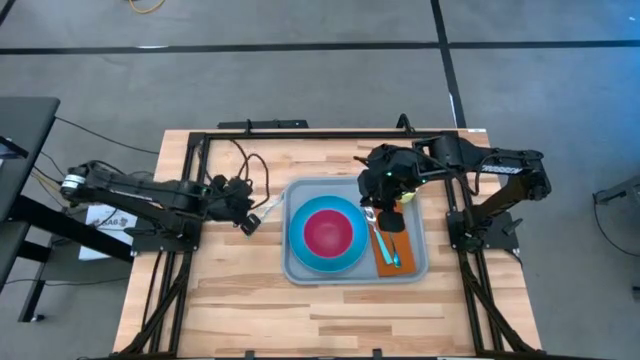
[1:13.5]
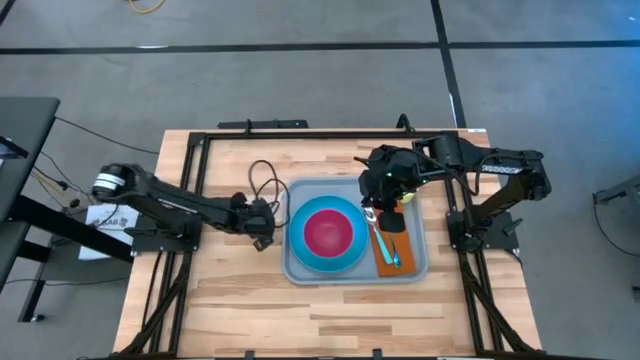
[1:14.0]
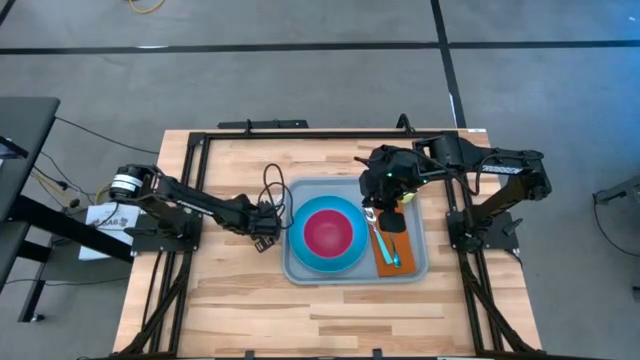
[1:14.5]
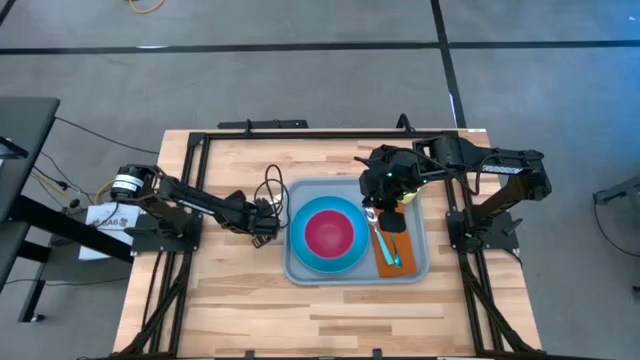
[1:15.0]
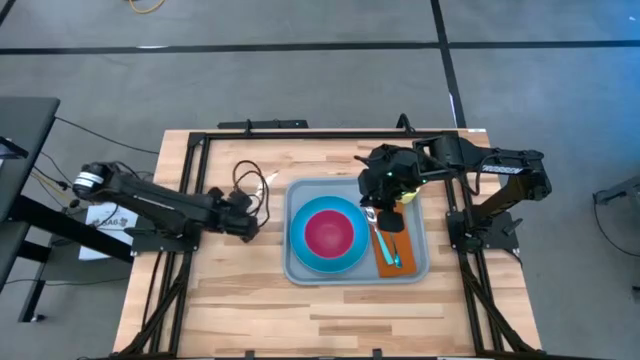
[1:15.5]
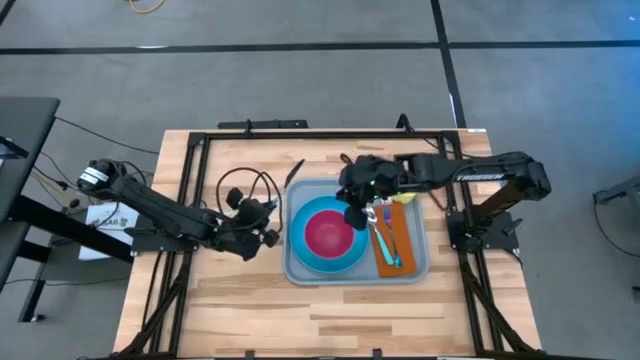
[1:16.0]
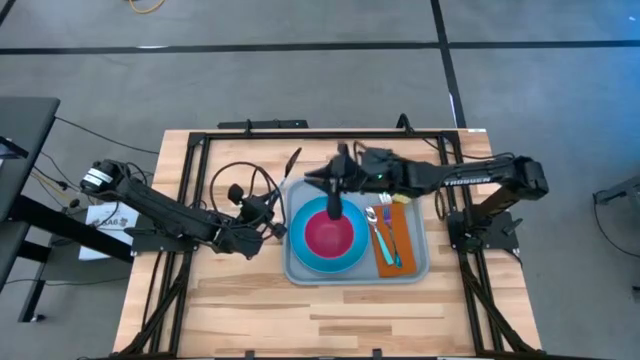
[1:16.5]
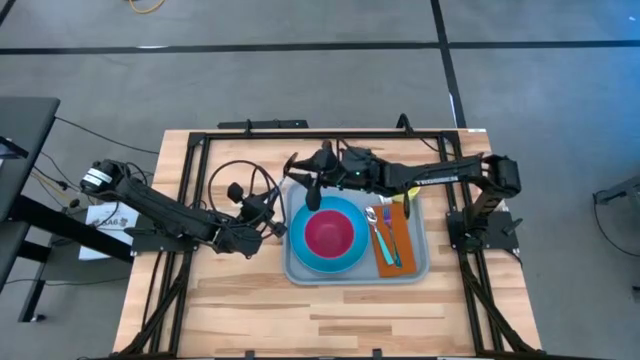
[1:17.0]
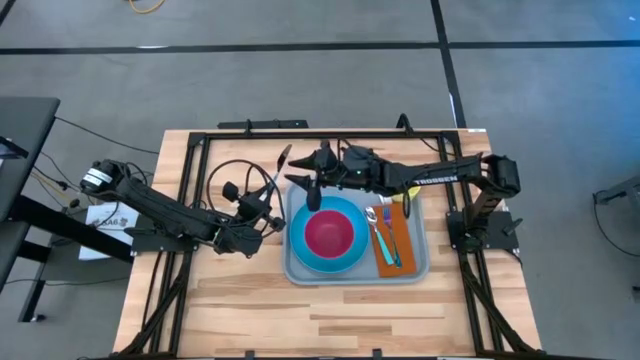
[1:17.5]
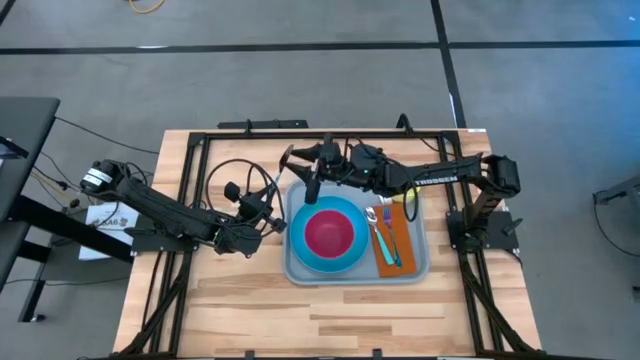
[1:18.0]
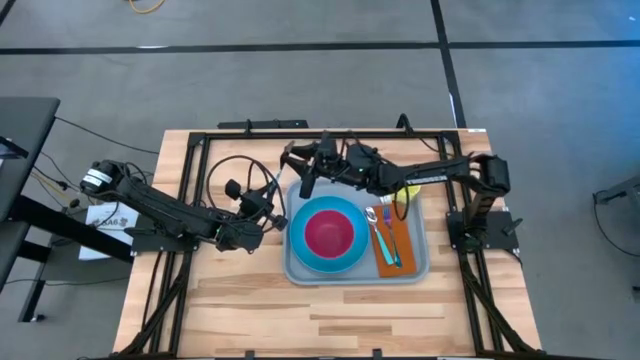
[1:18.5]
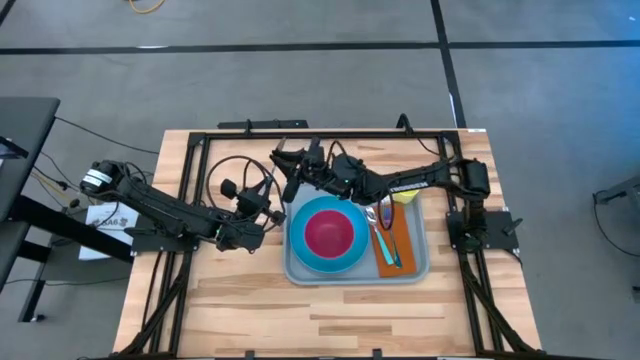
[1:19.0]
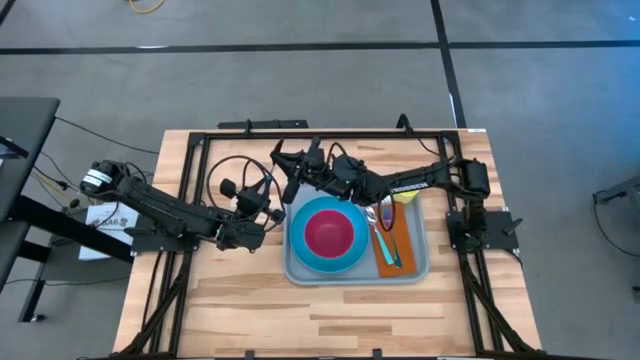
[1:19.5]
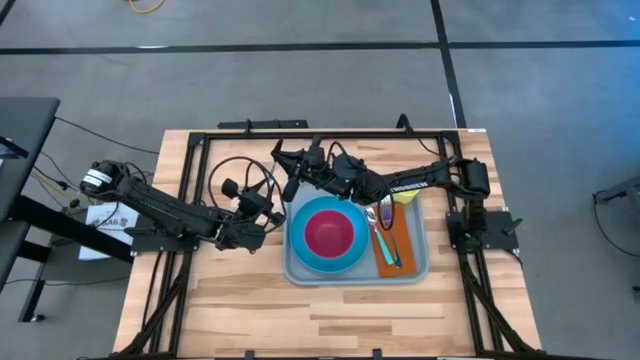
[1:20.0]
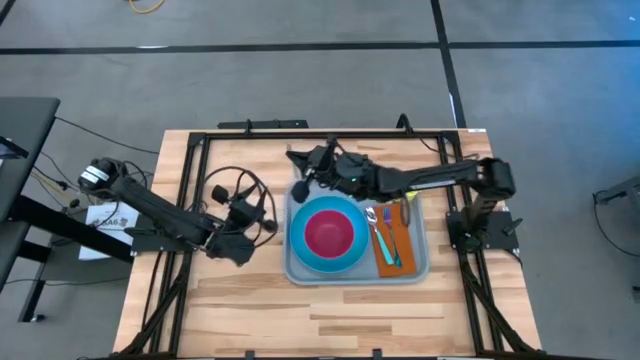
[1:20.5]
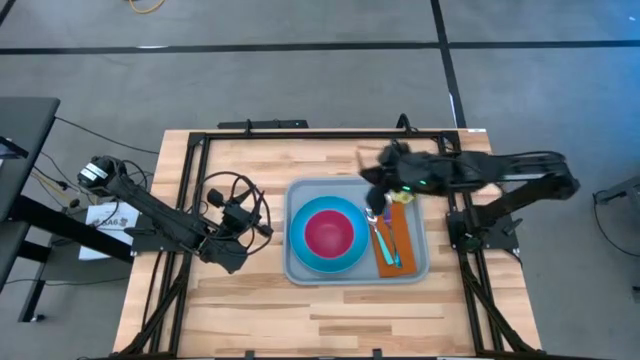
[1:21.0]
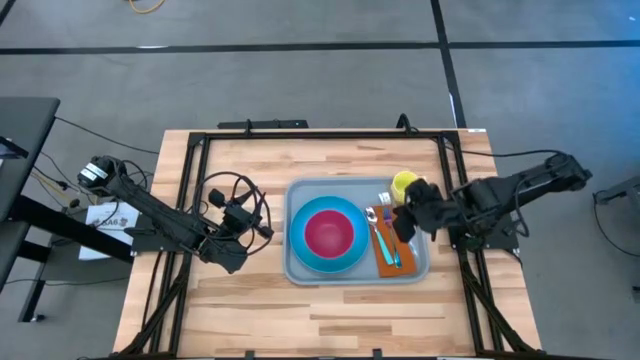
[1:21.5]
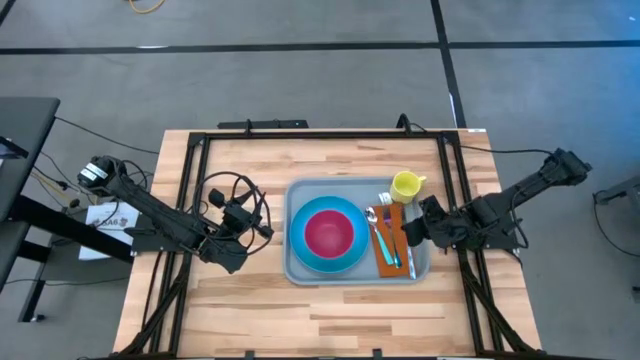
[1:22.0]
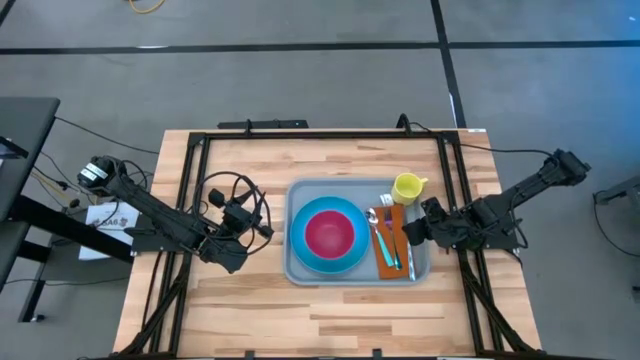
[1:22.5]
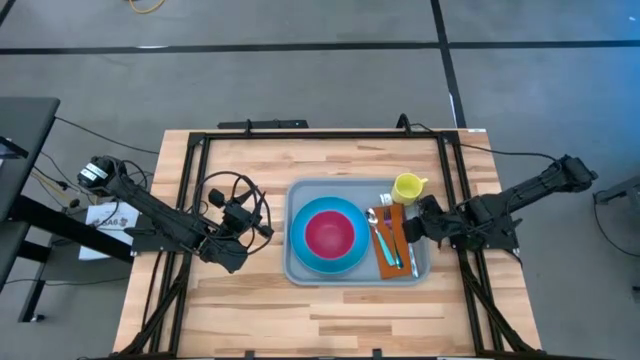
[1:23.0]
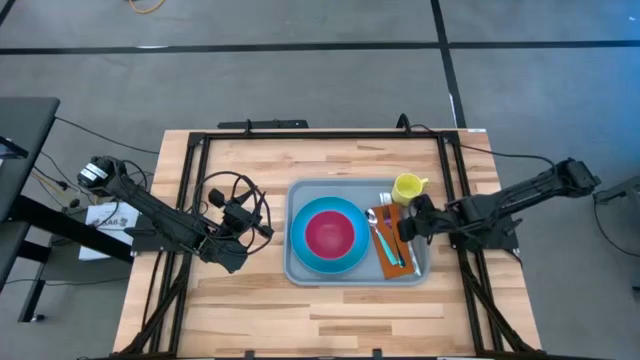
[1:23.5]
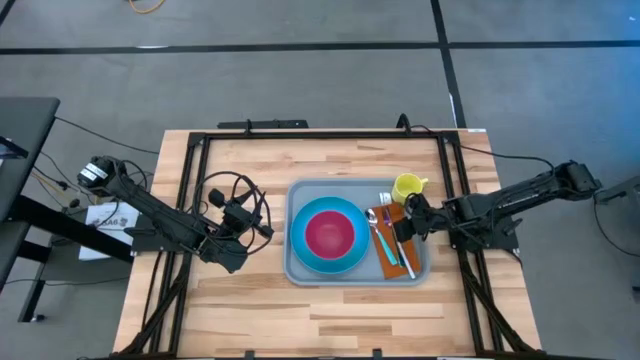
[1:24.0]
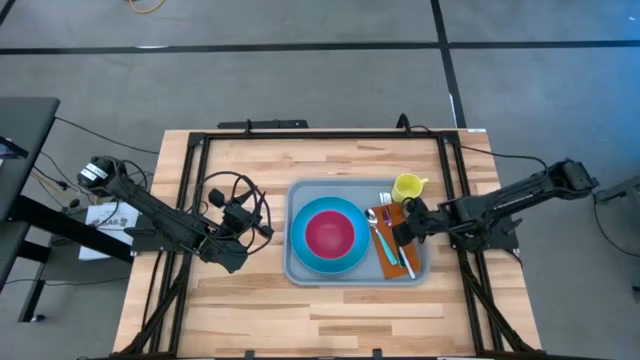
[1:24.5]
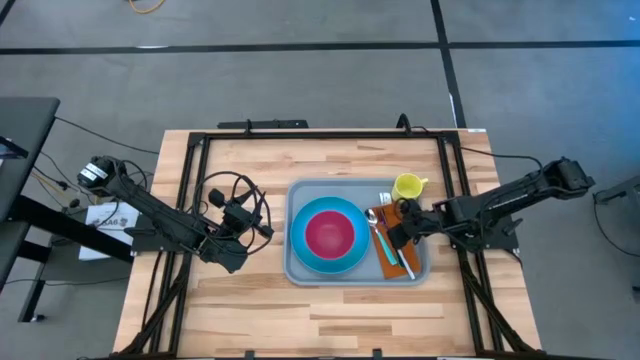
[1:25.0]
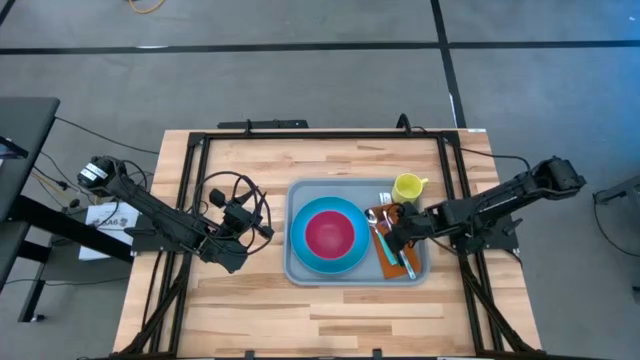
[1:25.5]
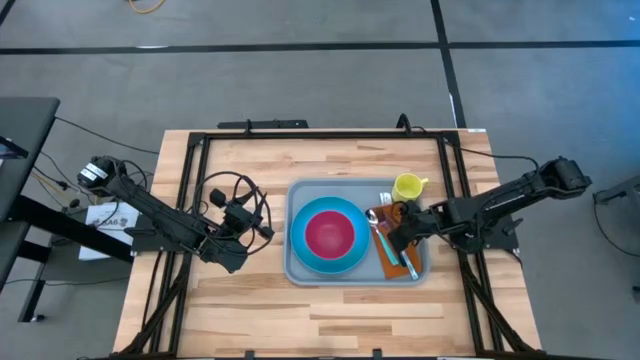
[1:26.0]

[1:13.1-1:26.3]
Task: Set up tray
Put the blue patterned knife on the brown napkin to the right of the purple fork

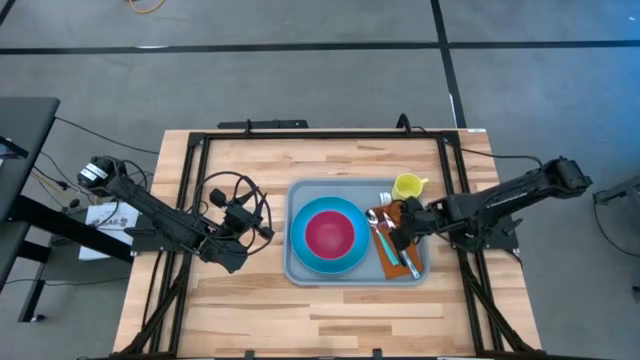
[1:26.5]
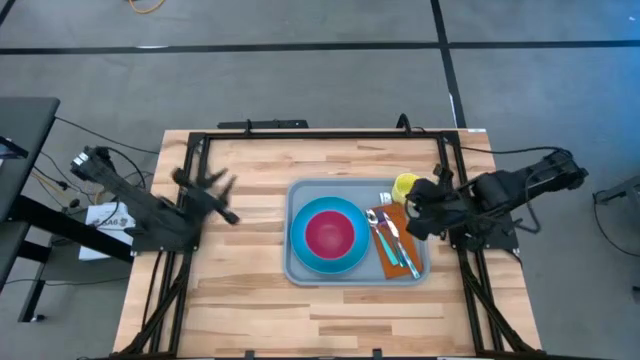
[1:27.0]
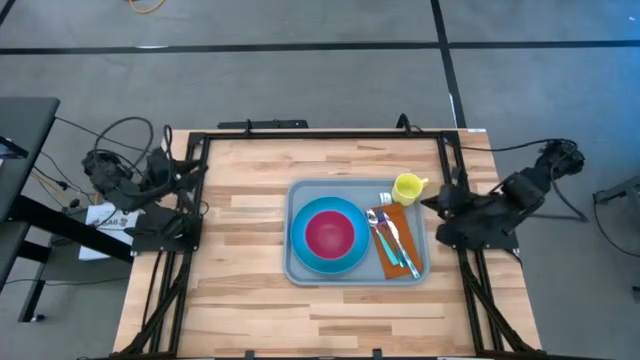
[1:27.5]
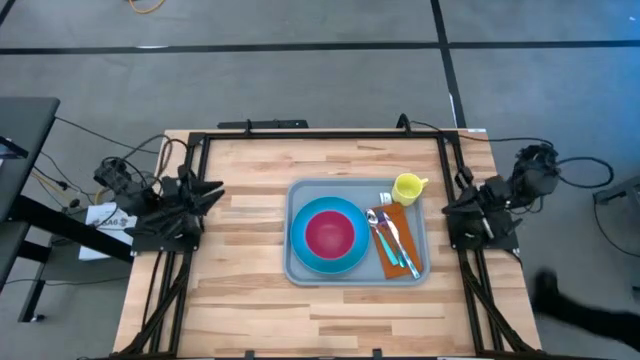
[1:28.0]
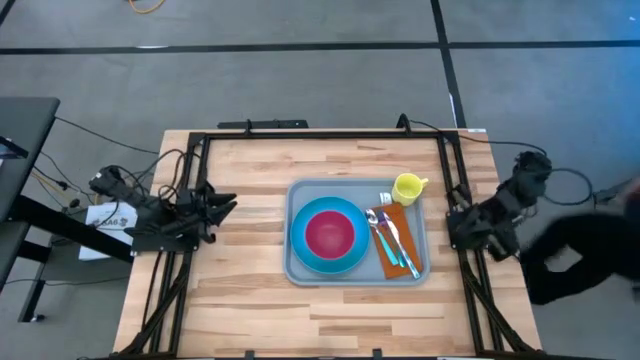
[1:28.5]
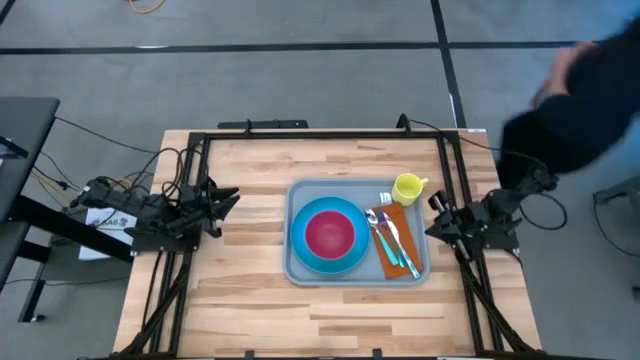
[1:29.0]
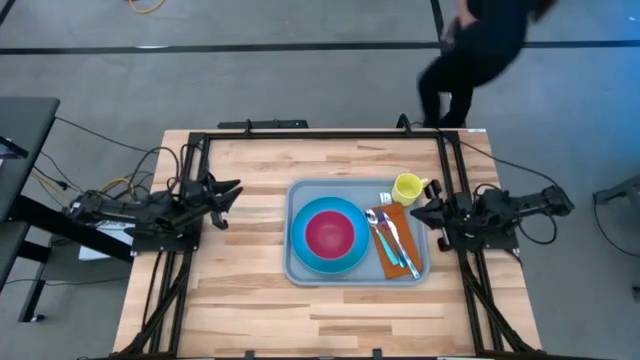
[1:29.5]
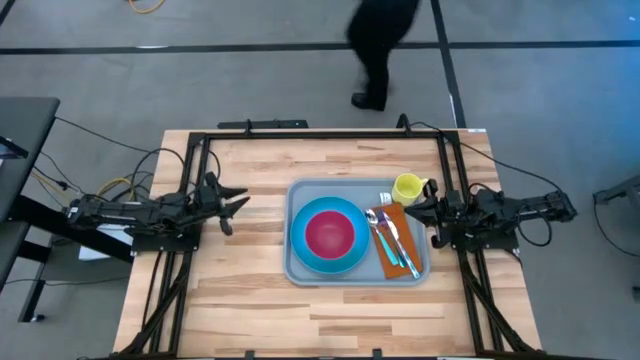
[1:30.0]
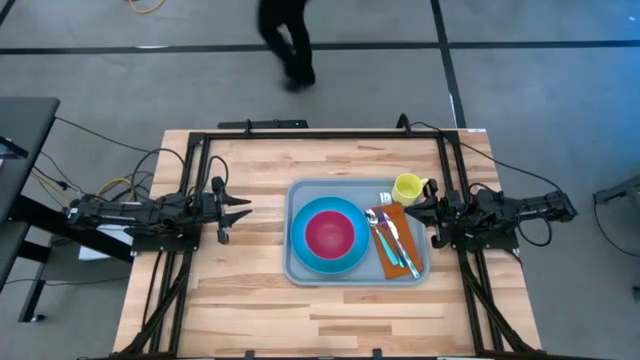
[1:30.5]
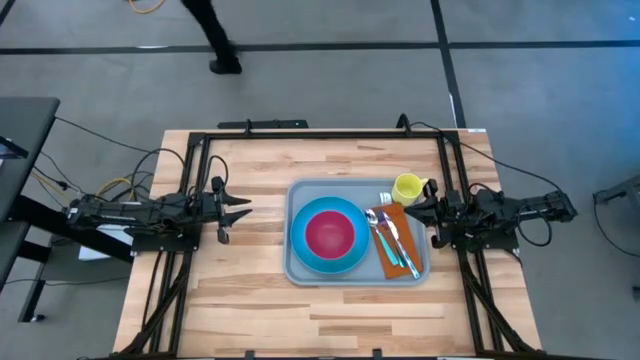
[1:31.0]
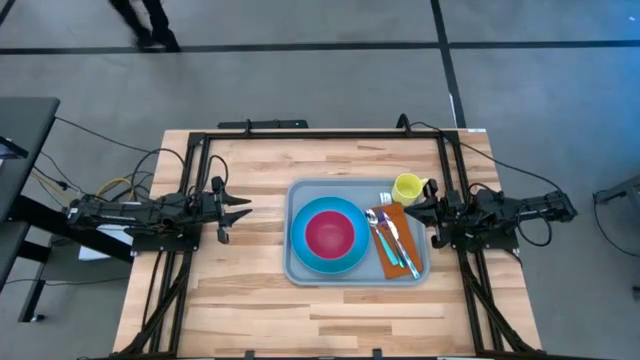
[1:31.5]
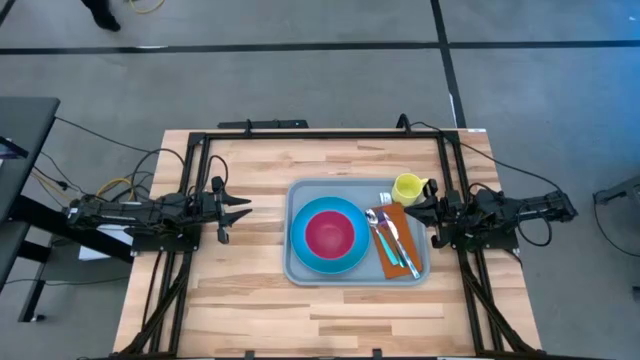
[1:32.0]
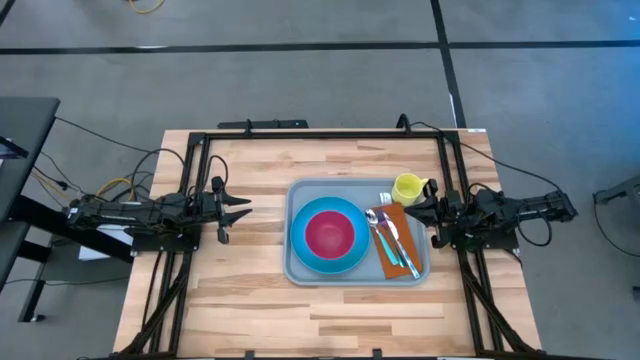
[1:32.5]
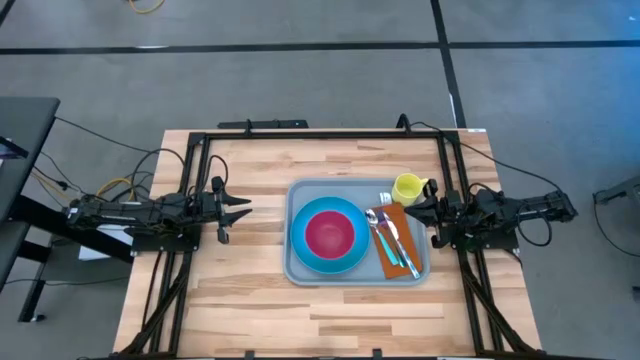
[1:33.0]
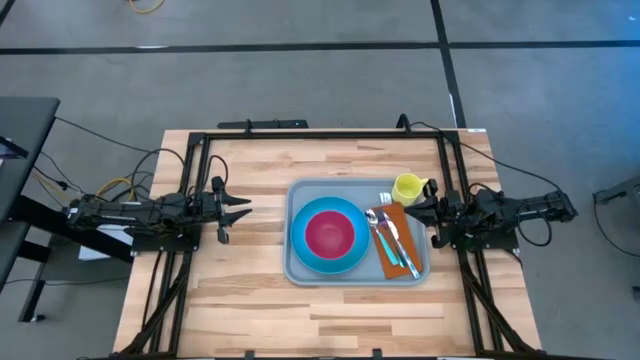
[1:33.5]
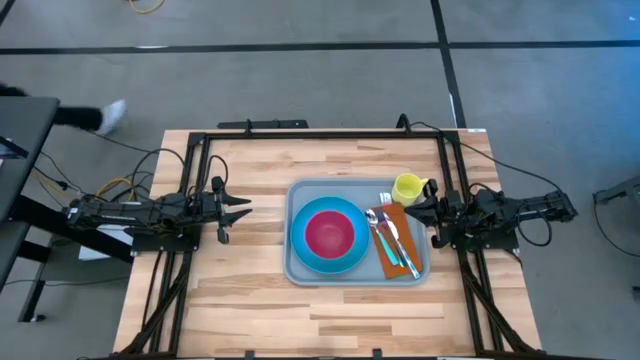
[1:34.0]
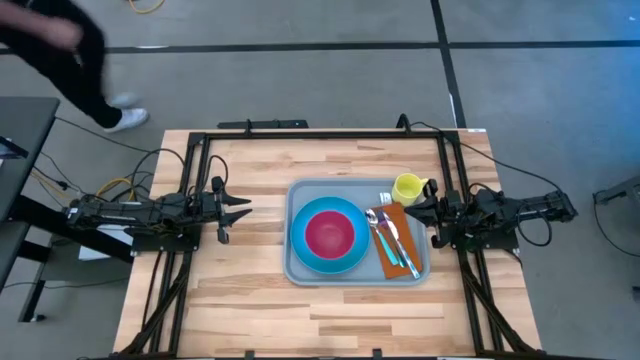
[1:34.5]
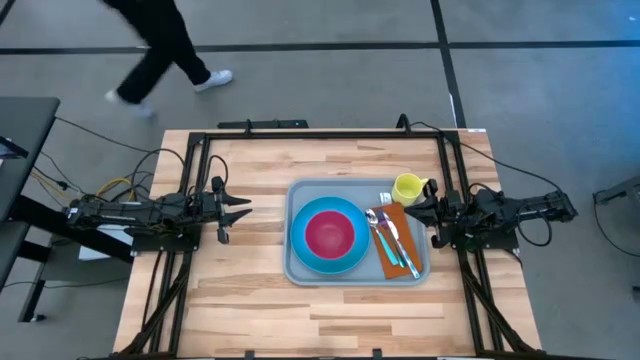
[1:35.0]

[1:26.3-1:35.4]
Return to Home Position
